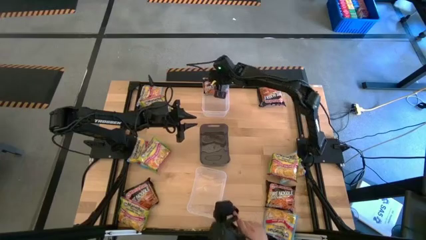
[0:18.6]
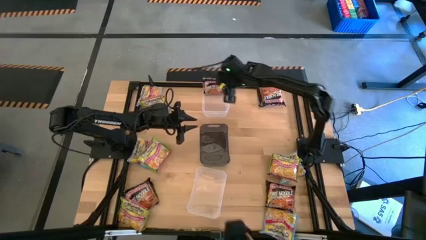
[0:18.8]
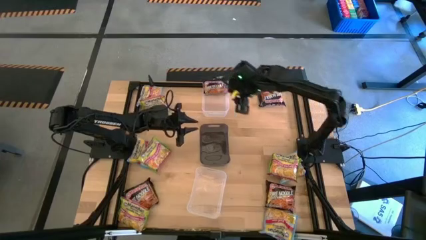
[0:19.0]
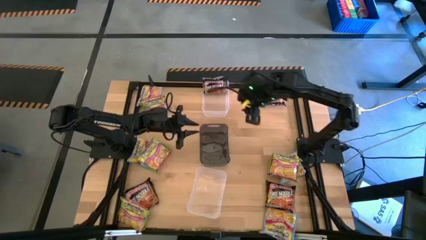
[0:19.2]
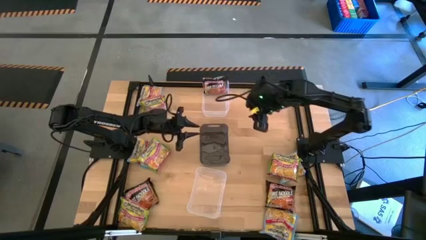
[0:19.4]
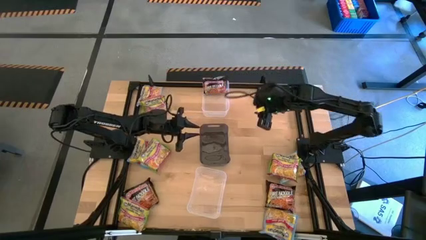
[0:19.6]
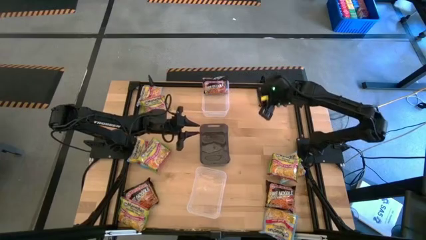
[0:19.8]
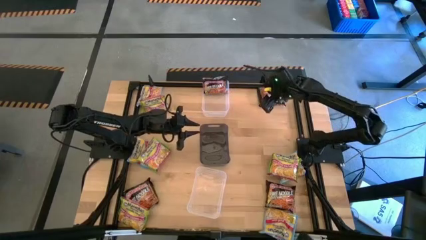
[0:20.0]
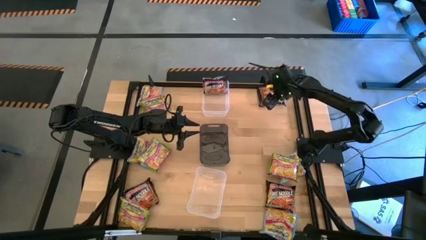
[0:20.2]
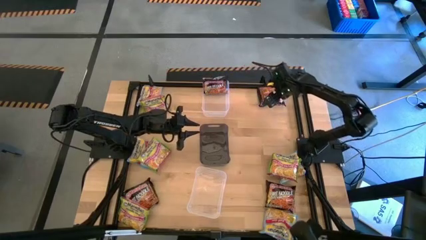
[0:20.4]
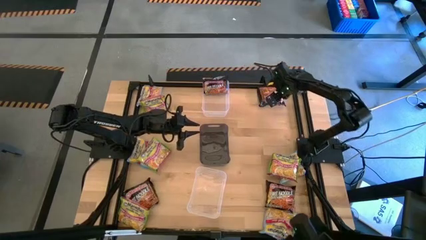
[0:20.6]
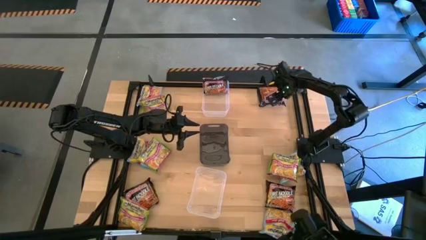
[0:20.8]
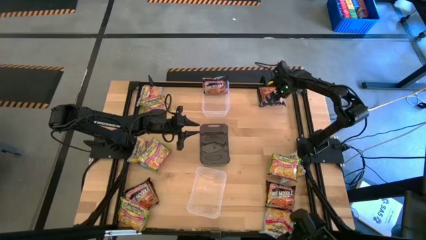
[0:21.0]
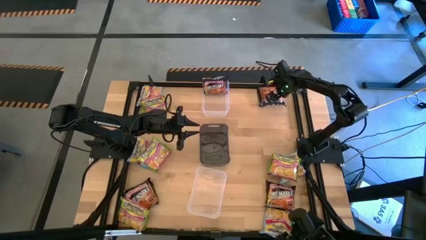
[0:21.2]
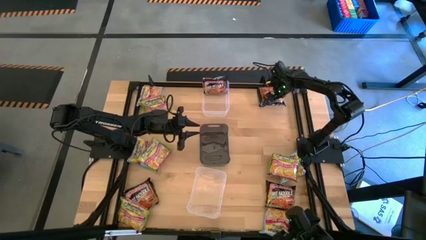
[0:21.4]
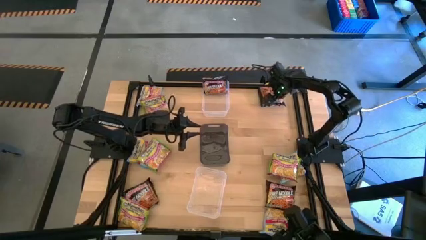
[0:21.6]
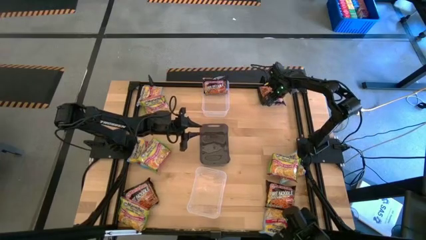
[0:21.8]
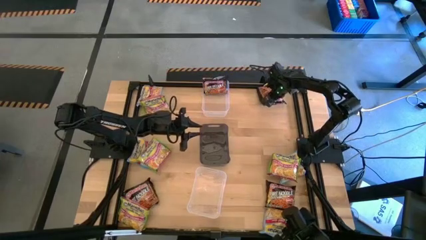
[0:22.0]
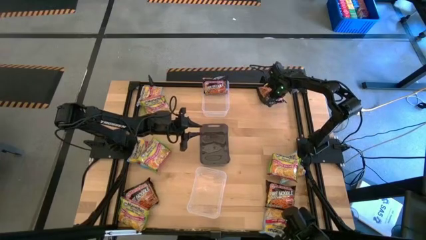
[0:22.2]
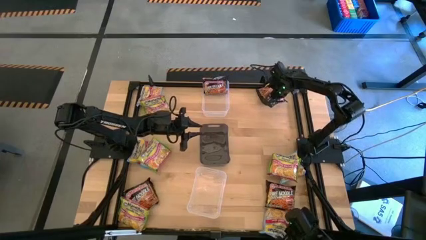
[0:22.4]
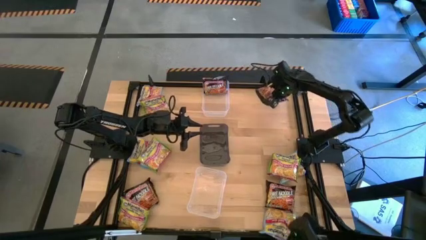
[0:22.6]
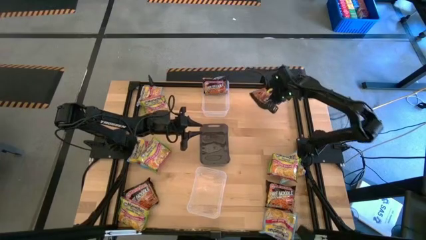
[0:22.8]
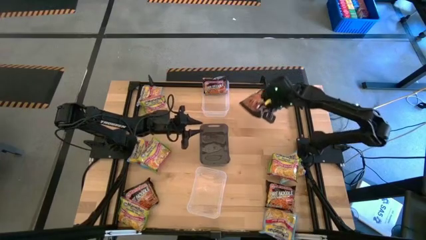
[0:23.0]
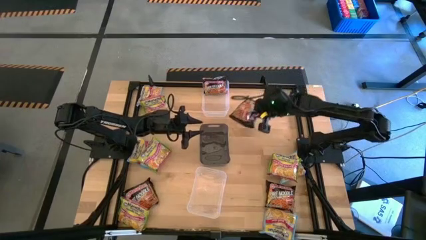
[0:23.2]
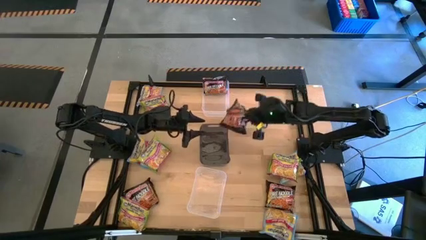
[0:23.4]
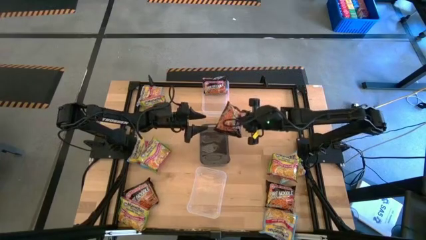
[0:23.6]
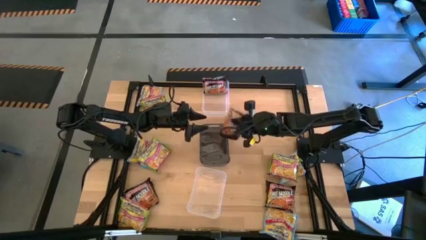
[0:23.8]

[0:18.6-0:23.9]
Task: Sort Maruchan noodles
Put the black noodle pack into the top transparent bin

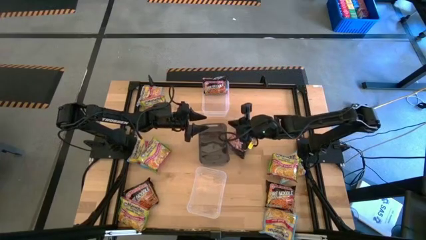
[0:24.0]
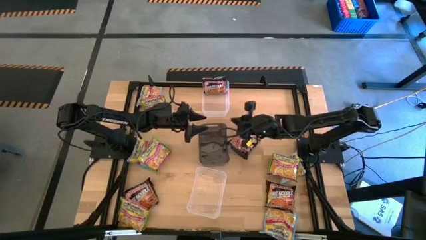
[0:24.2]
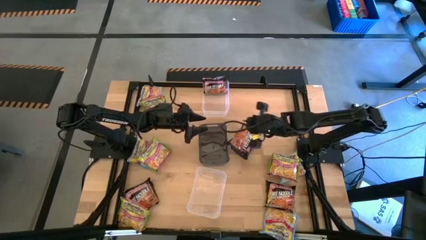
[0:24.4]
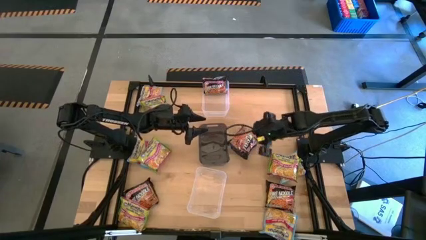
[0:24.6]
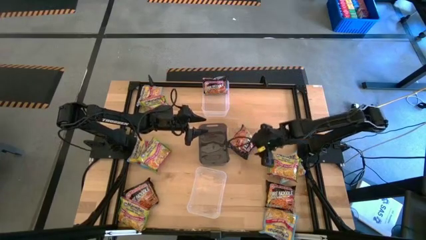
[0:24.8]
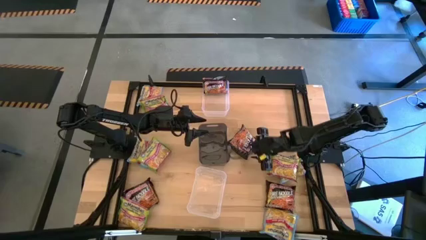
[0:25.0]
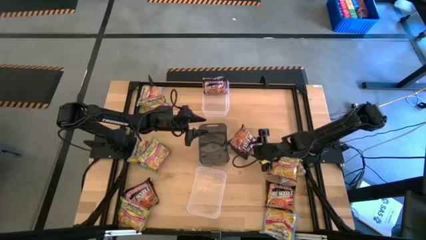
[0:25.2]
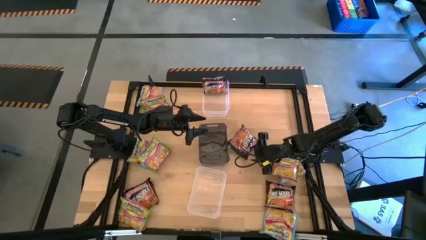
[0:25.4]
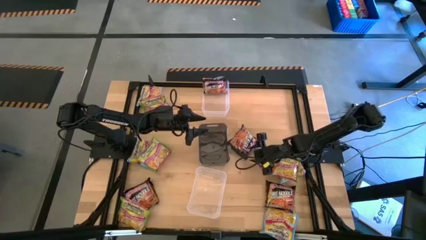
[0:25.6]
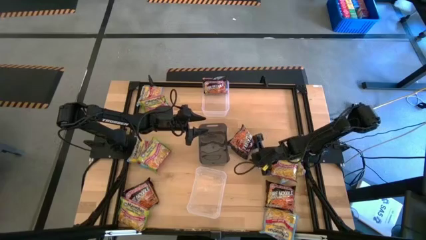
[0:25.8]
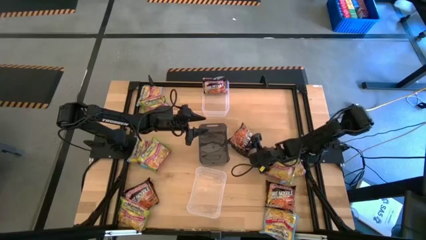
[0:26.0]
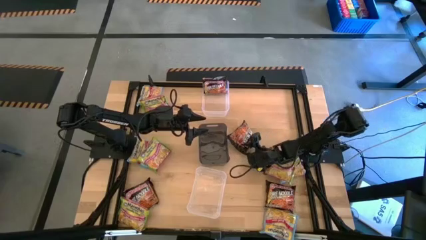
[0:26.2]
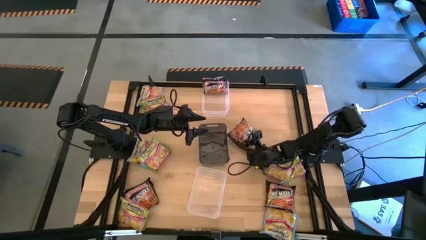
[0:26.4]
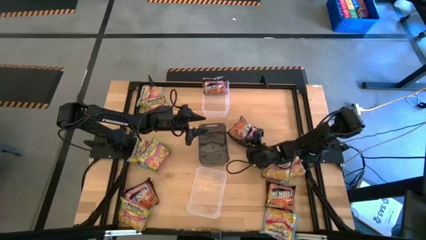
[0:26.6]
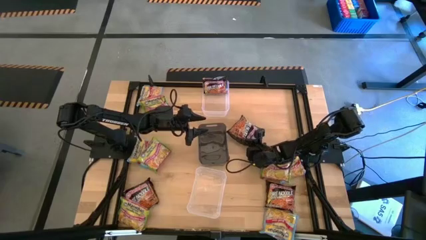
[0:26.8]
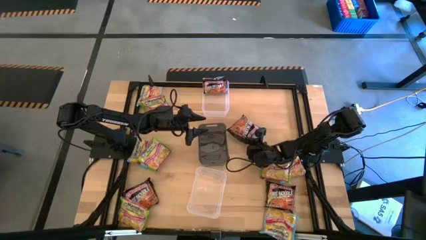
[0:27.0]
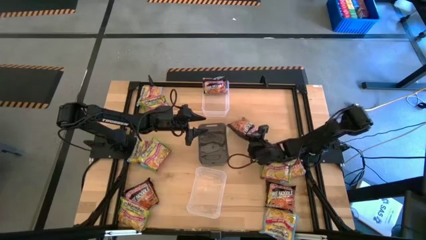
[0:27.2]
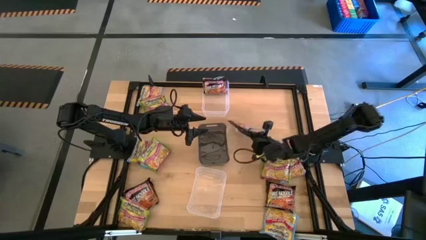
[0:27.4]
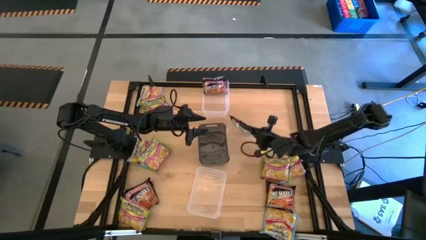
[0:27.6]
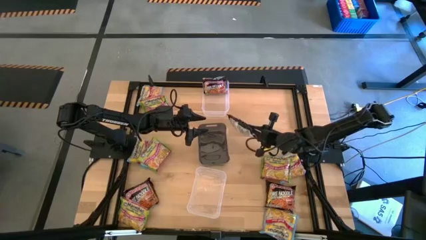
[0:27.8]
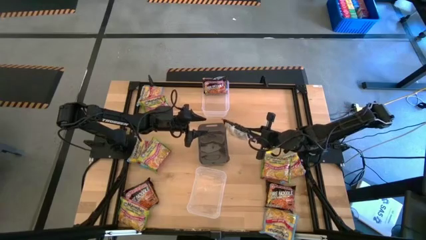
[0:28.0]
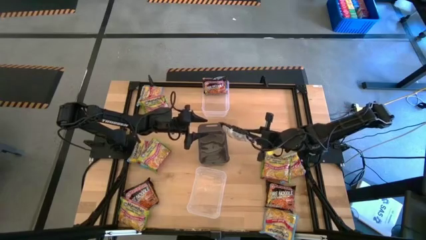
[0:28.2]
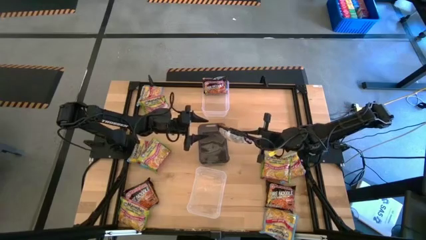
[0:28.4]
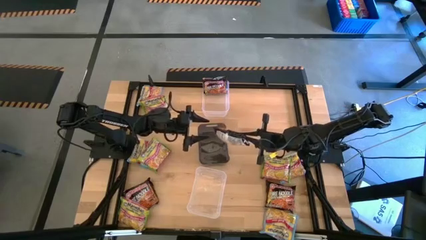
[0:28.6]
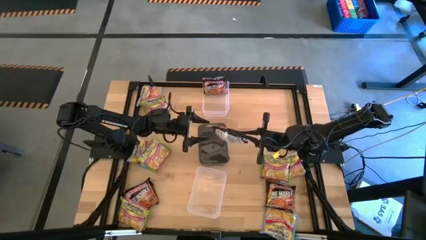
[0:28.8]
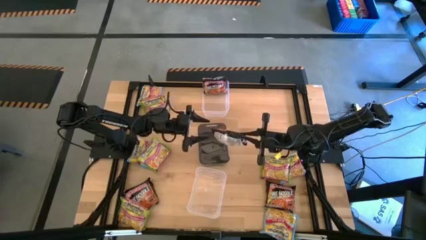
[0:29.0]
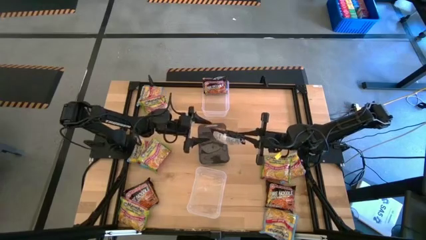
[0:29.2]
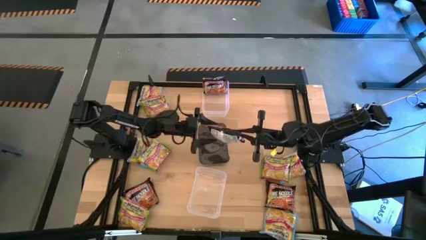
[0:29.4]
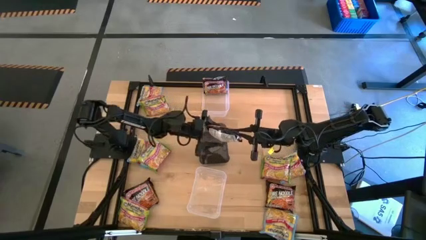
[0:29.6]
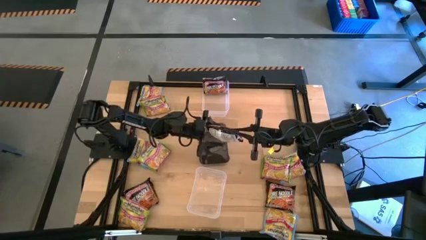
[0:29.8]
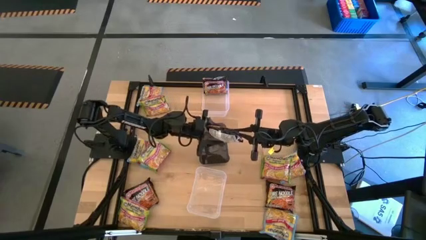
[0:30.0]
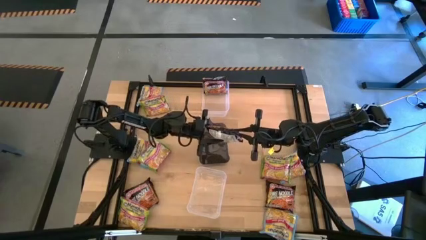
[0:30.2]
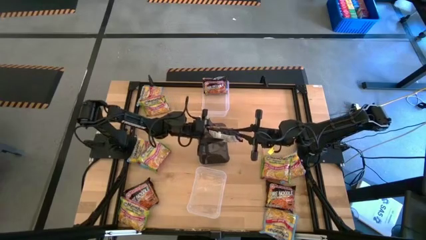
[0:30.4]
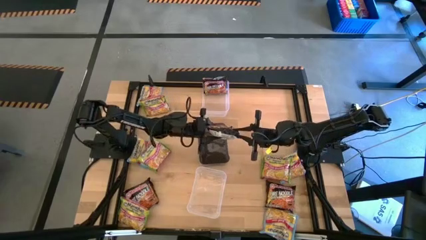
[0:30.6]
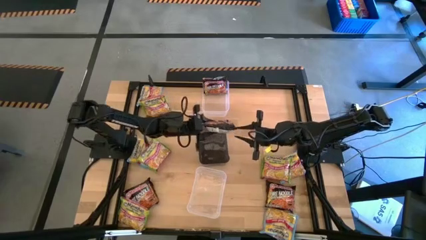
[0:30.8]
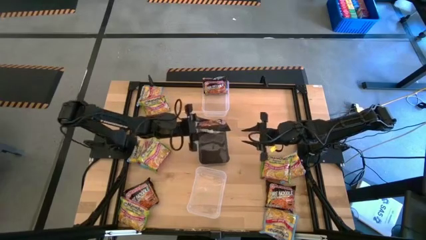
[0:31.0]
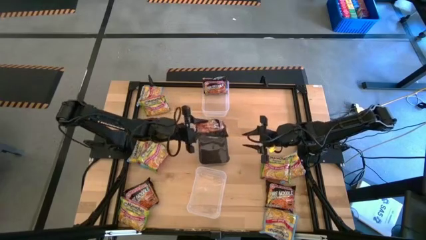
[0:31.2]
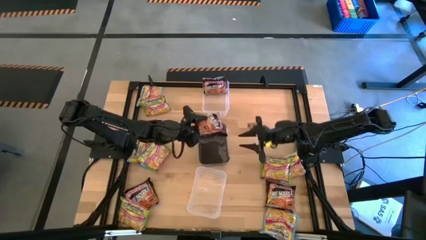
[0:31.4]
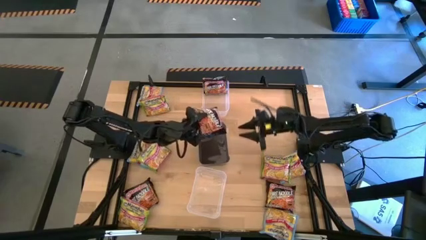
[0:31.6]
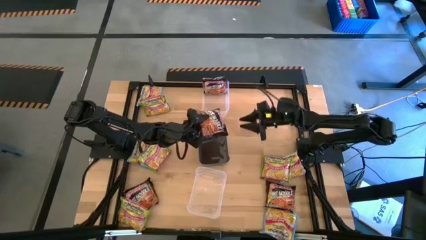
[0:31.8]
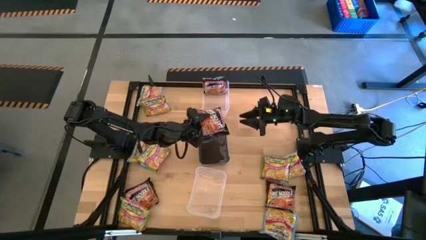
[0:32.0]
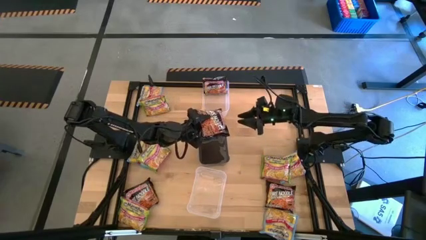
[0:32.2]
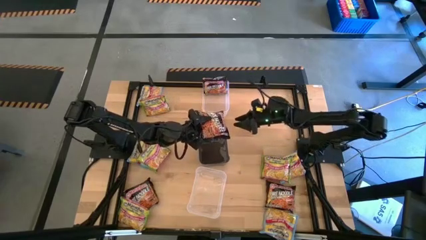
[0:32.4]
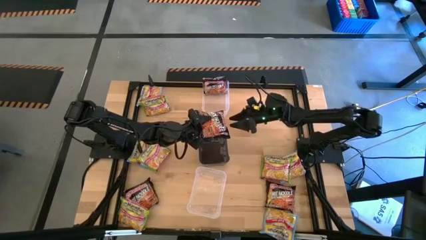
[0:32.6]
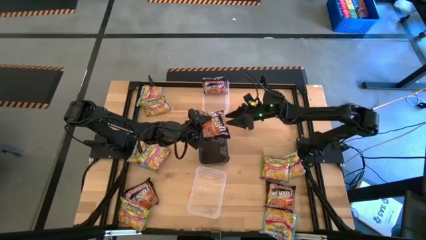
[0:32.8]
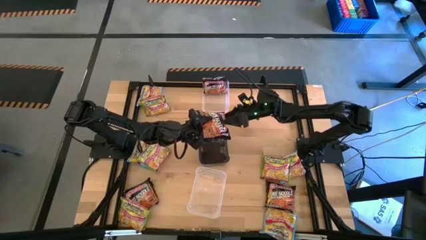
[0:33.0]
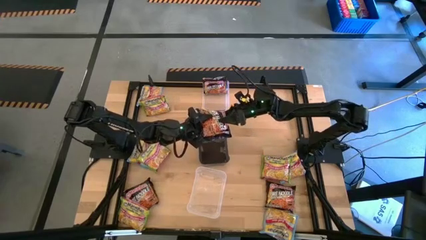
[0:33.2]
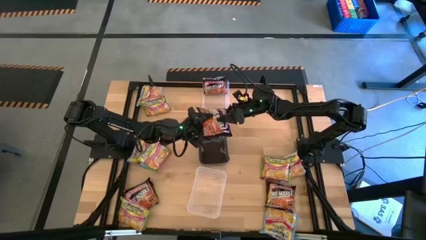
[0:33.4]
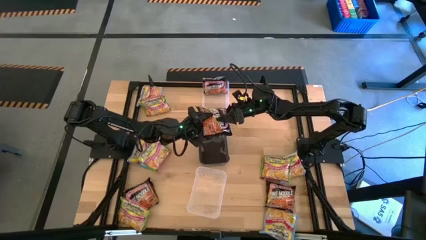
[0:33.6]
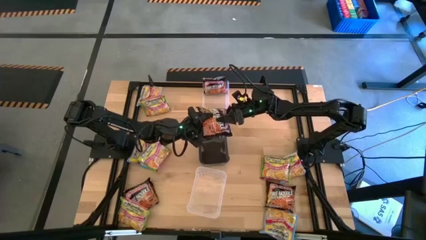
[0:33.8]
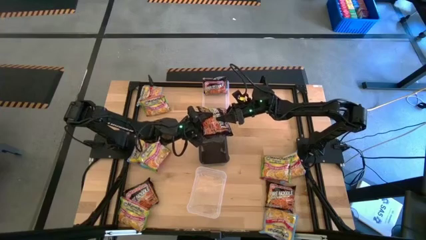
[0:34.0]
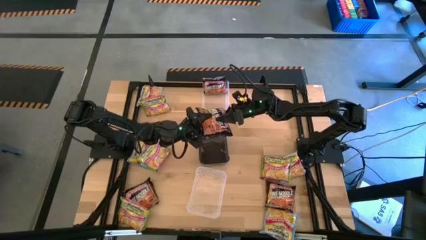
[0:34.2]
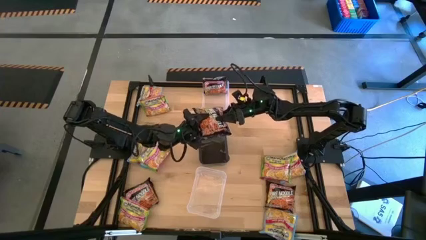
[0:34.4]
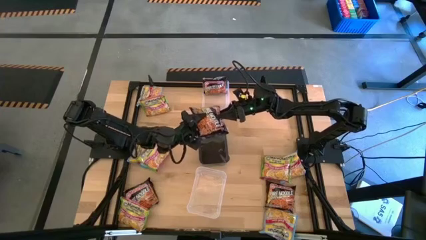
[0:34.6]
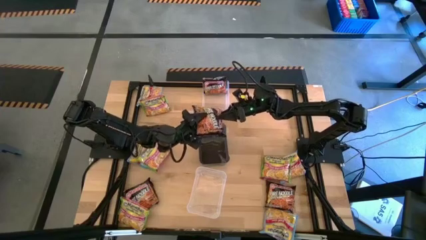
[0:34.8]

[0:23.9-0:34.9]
Put the middle top black noodle pack into the top transparent bin
